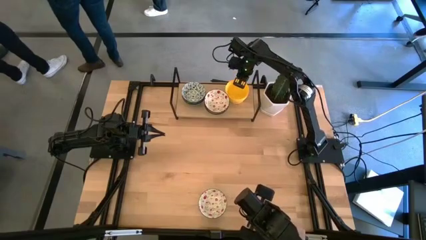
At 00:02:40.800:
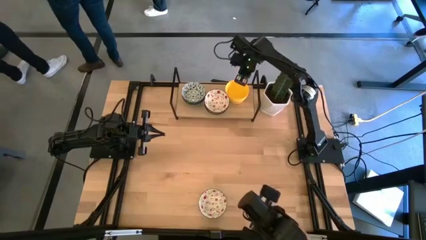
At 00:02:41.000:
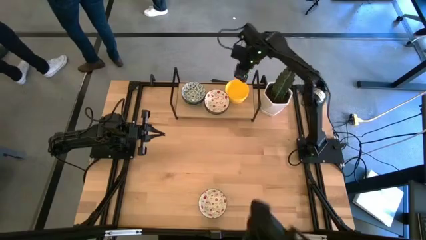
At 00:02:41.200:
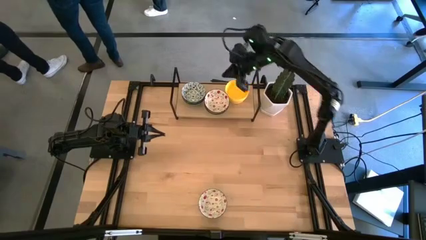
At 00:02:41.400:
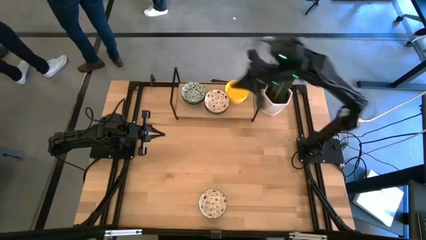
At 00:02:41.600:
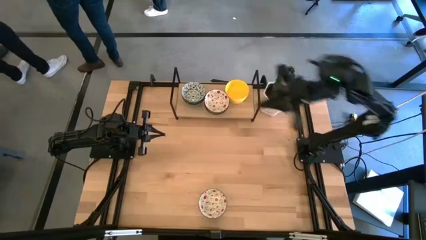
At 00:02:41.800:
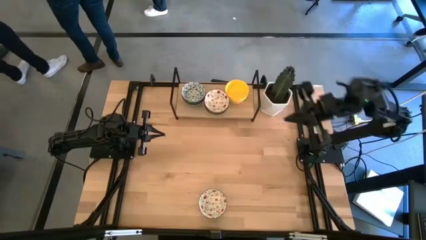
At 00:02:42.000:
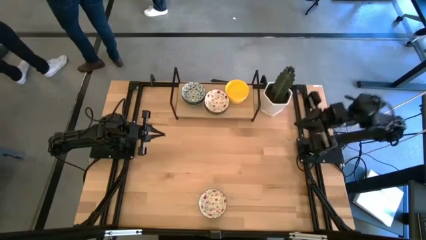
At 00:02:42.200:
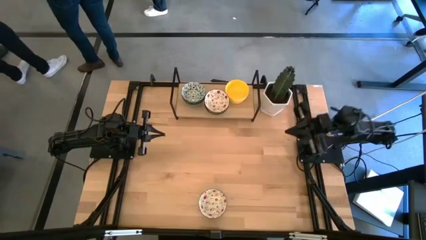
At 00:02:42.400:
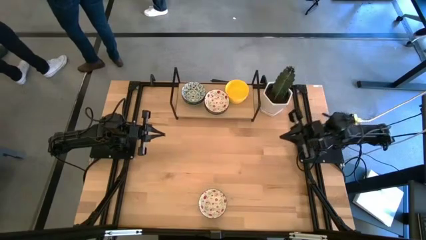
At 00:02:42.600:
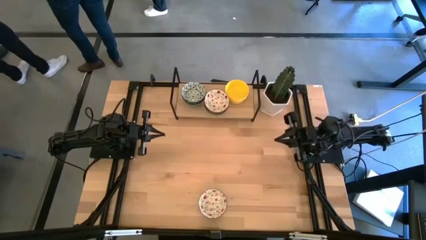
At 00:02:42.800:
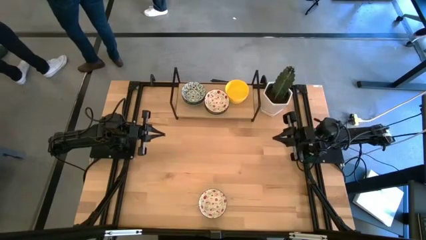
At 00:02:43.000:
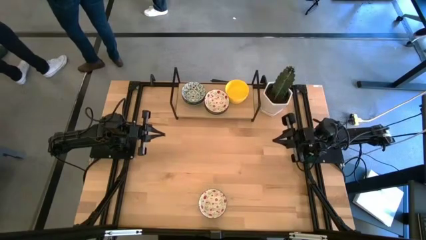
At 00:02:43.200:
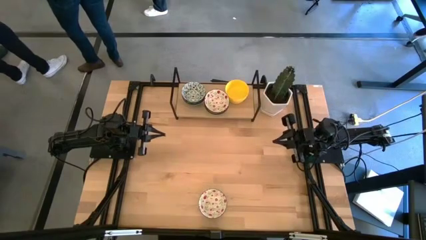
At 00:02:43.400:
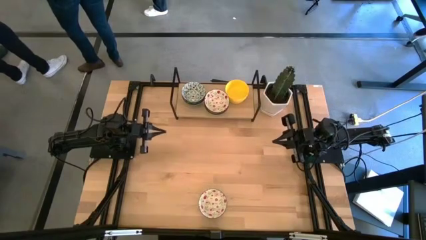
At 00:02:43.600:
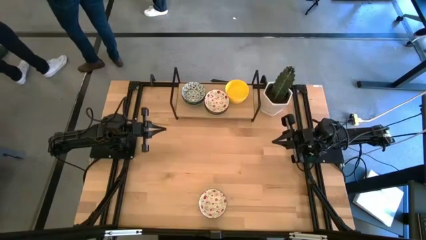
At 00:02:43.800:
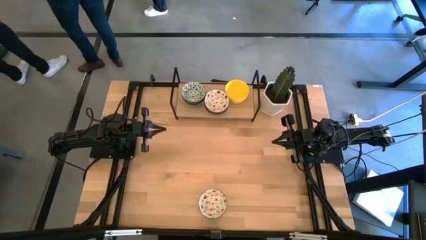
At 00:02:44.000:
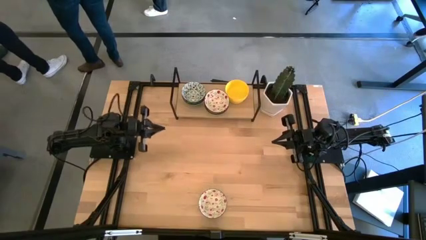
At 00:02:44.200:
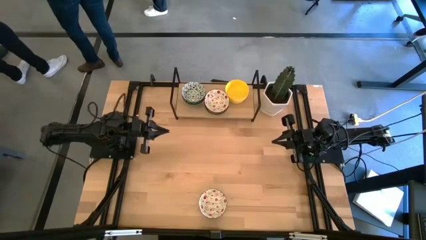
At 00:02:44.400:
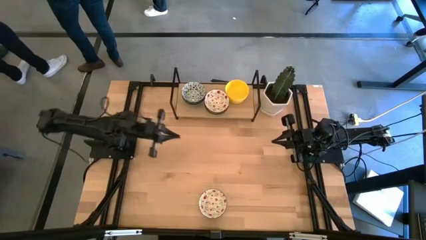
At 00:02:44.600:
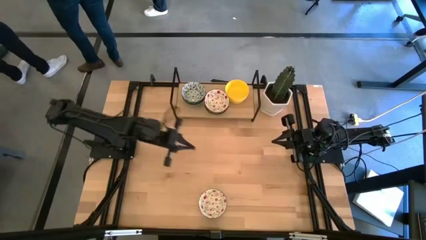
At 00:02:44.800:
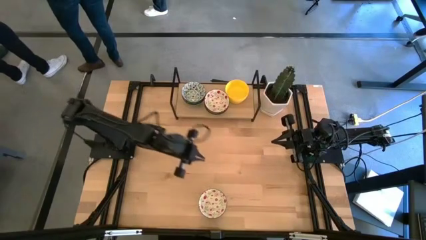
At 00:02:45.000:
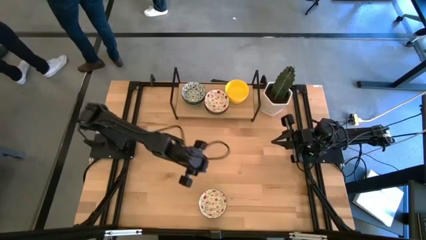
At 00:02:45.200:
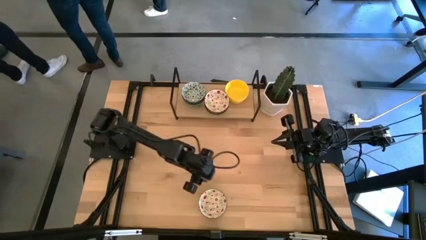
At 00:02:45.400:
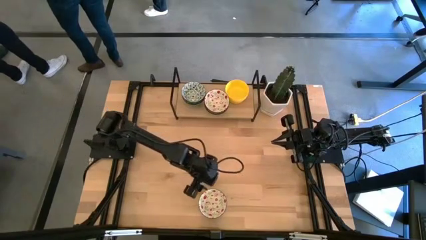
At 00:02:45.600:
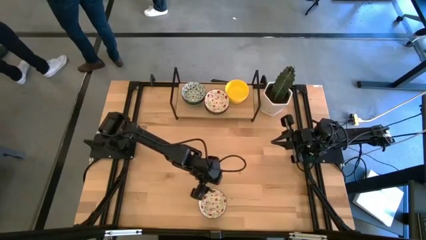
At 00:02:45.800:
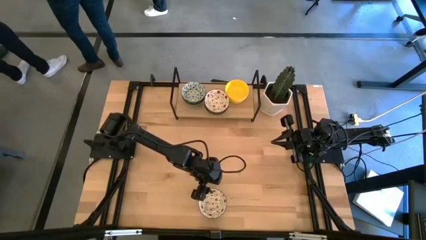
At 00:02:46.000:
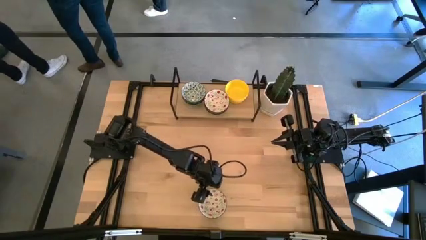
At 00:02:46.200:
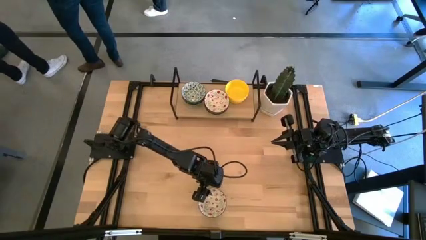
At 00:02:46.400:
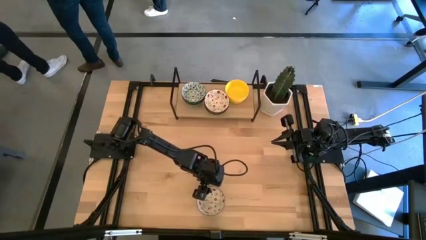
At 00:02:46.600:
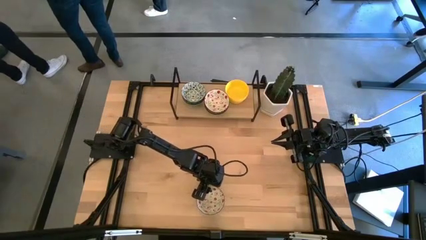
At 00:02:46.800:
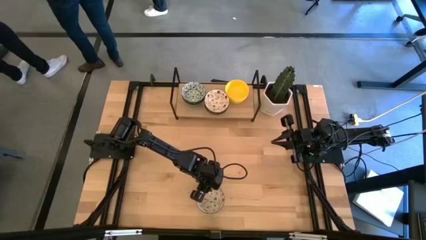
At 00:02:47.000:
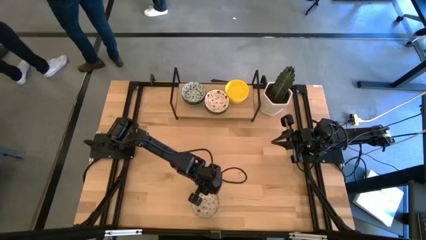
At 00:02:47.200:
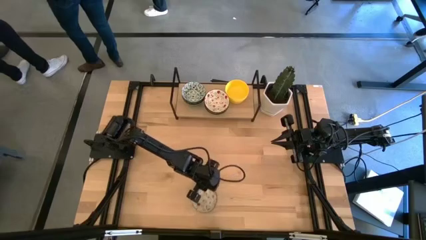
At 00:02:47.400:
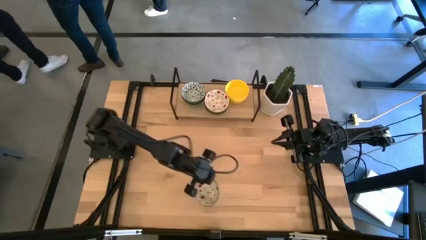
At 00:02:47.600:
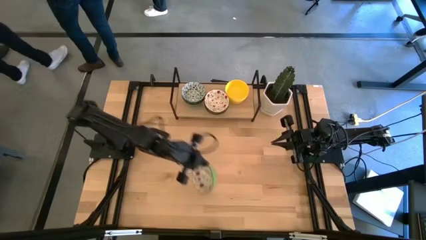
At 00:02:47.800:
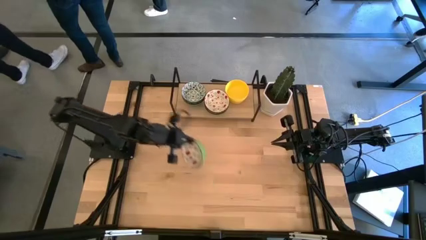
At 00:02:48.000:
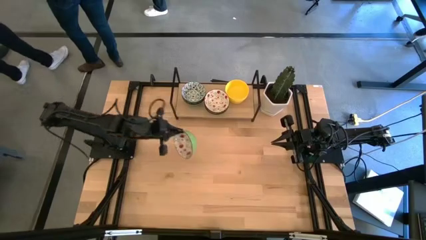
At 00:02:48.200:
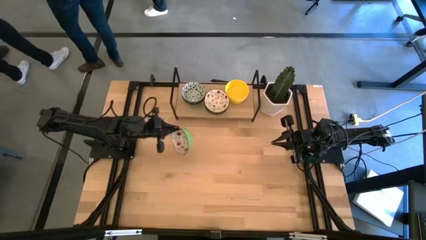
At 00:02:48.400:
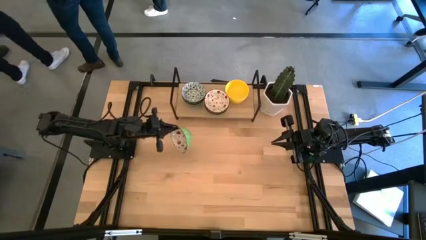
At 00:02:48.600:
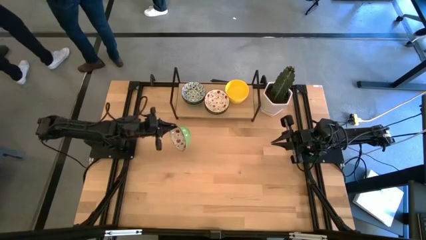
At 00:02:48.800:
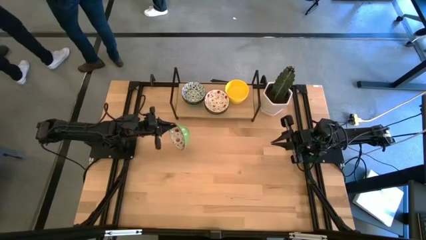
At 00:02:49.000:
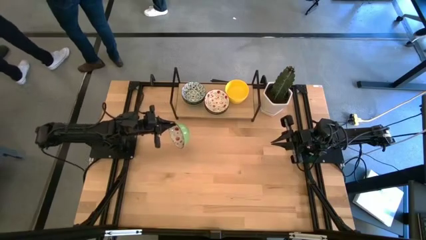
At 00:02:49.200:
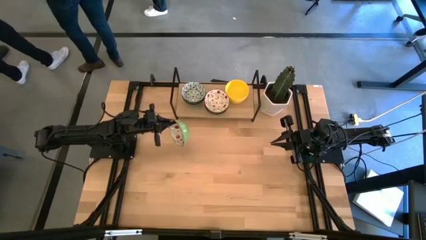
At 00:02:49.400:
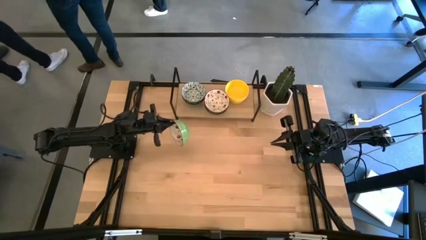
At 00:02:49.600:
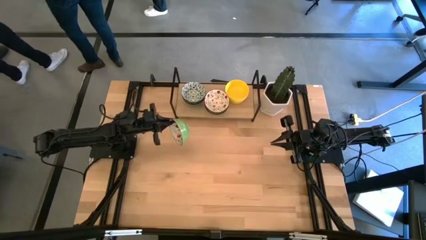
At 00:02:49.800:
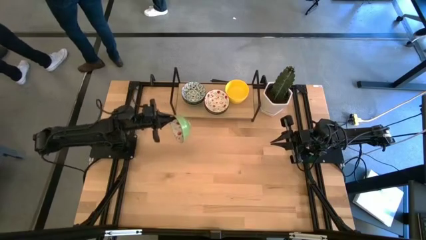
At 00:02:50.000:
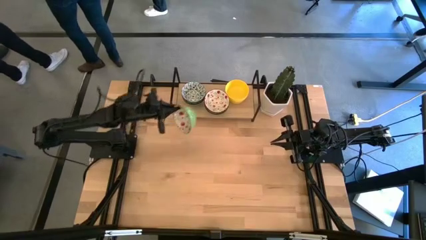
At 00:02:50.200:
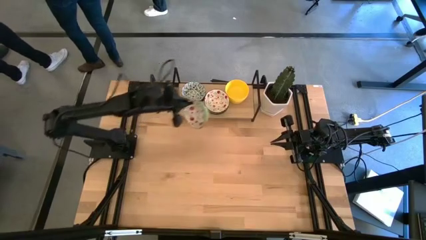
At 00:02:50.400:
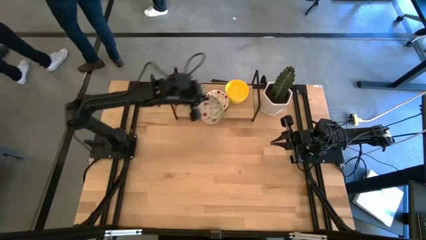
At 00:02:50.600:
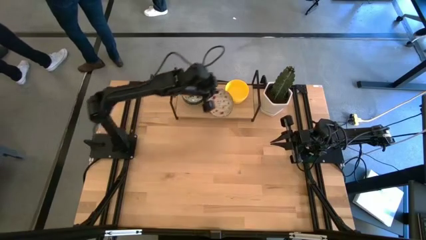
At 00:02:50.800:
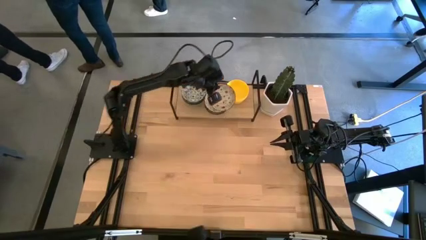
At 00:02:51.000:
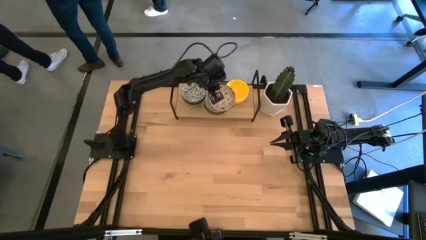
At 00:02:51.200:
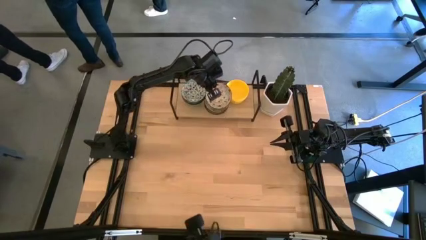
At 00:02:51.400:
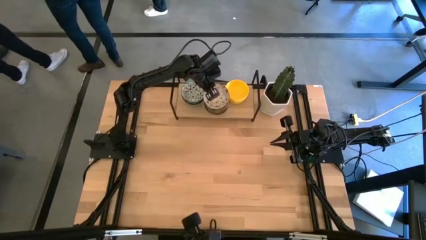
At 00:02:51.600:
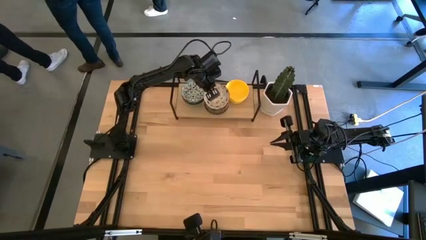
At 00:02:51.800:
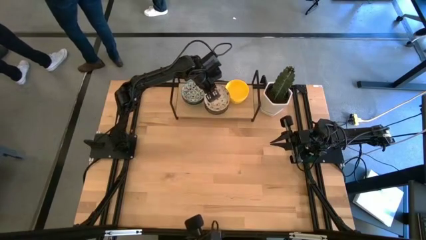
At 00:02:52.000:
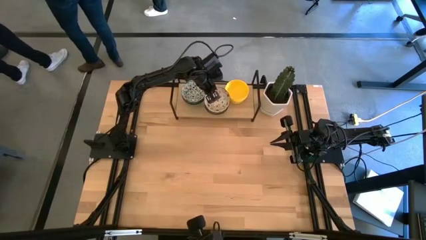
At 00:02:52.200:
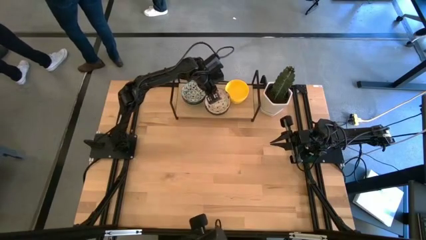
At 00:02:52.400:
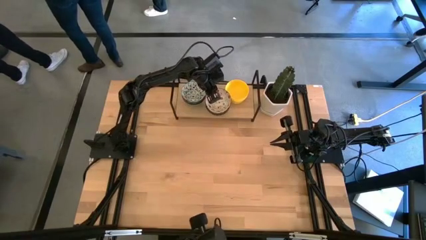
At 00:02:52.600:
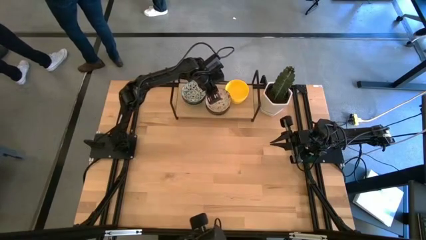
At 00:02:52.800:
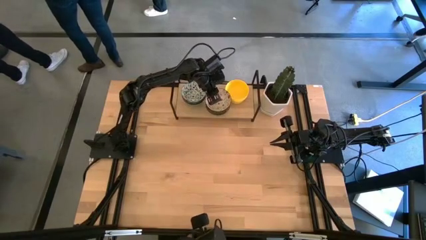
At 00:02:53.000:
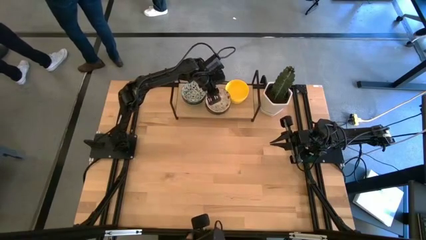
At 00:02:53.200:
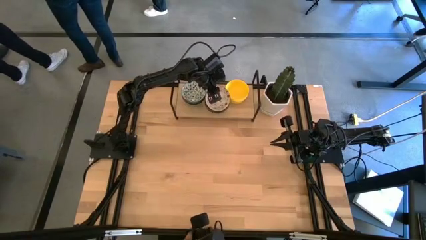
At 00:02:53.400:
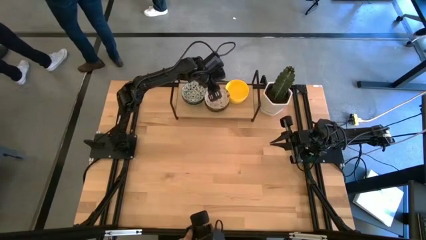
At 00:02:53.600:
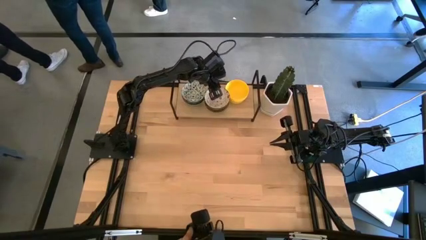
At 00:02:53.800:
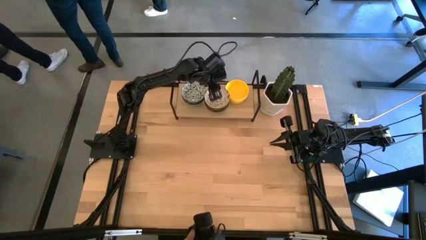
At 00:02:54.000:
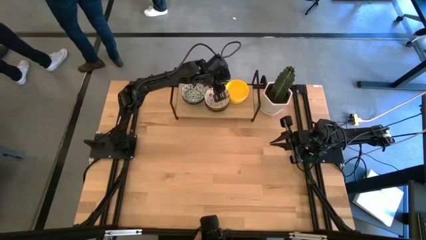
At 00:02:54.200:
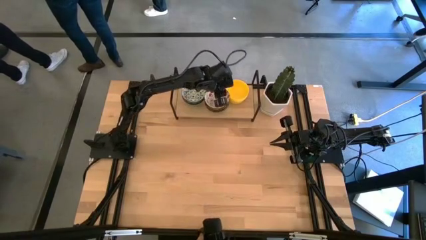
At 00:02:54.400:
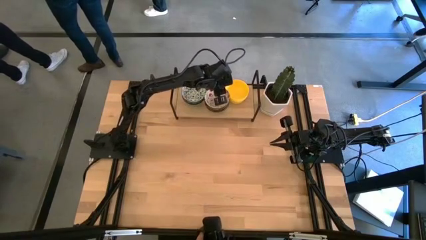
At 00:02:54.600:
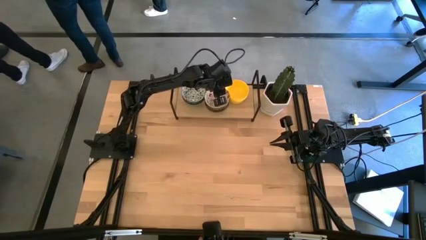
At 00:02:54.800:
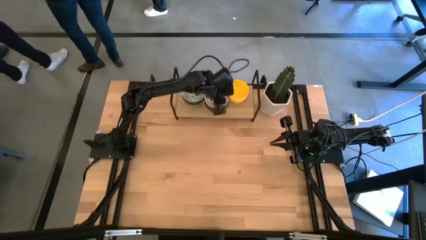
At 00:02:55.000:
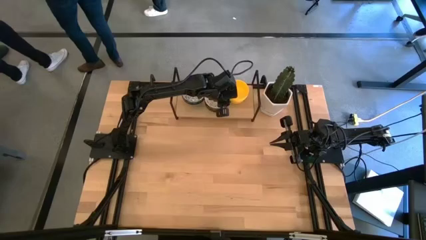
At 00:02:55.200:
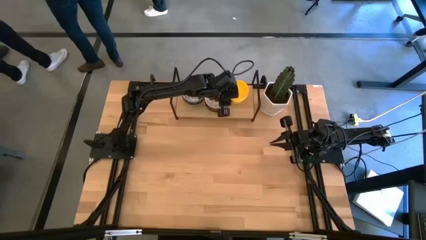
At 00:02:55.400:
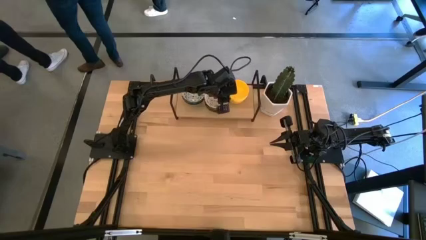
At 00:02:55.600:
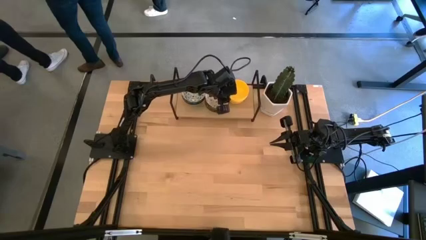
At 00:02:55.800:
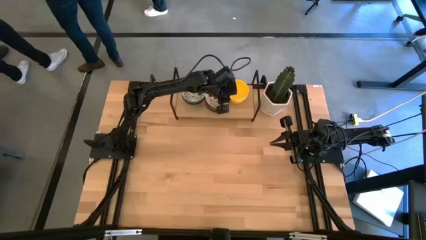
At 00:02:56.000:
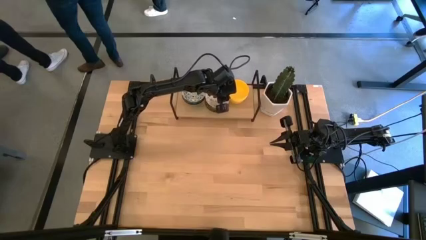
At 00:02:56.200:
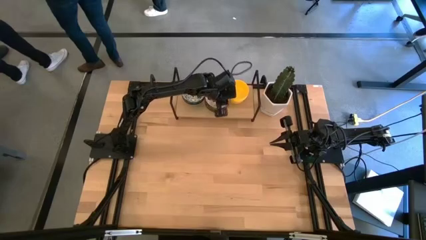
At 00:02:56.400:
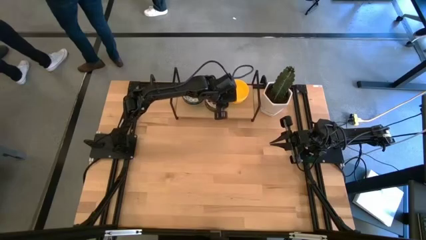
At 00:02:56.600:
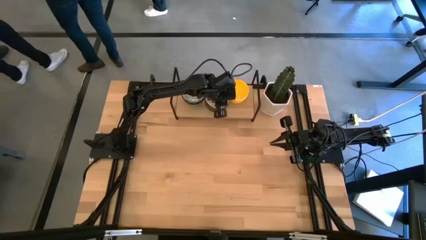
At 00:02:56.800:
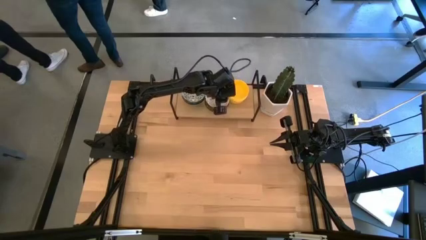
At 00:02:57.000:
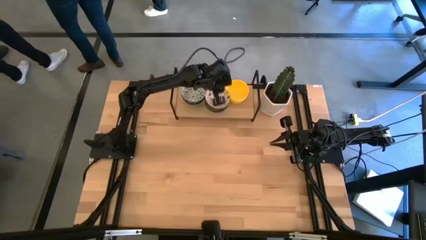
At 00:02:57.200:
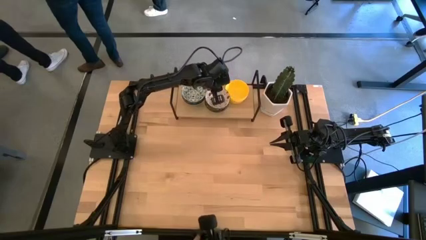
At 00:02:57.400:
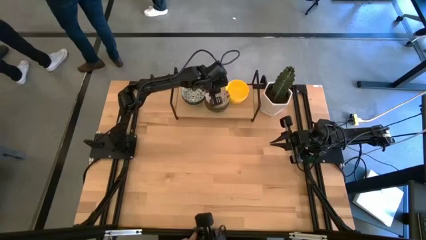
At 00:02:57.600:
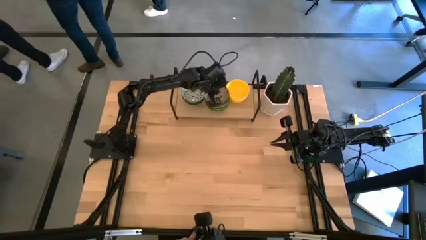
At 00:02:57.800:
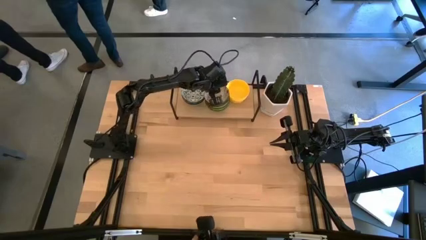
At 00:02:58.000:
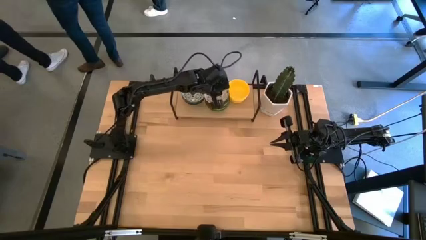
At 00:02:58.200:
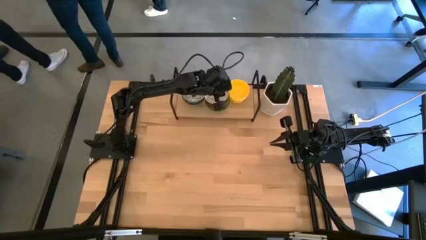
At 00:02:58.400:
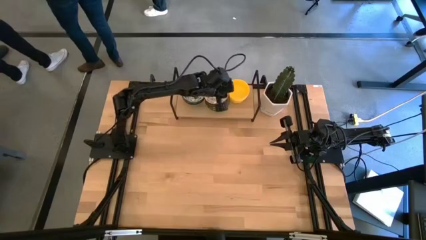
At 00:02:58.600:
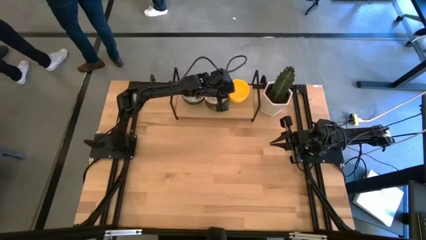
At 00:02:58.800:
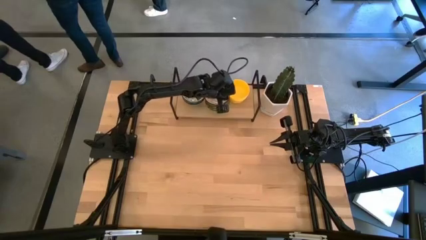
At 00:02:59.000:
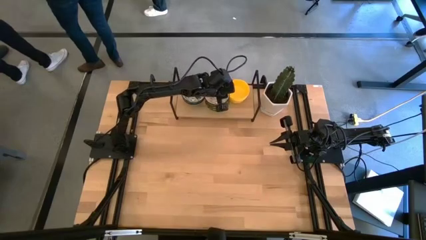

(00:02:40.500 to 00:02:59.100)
Task: Pick & Place Mini bowls
Stack the red patterned bowl on the red patterned bowl on the shelf
